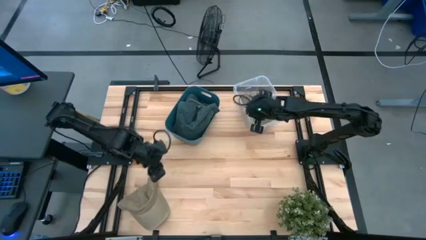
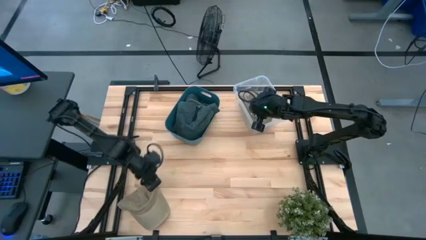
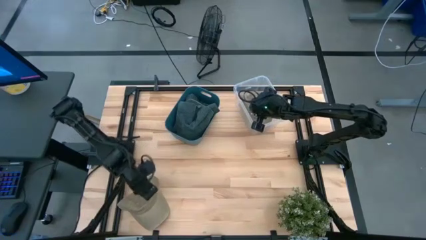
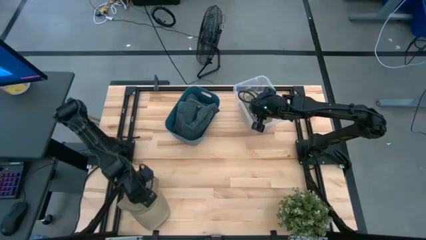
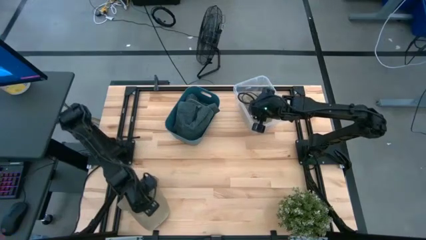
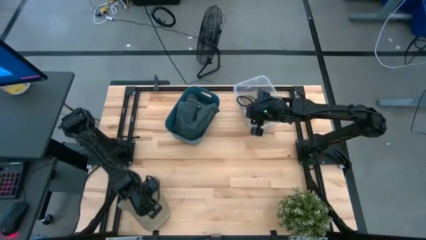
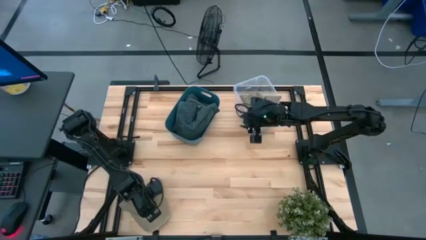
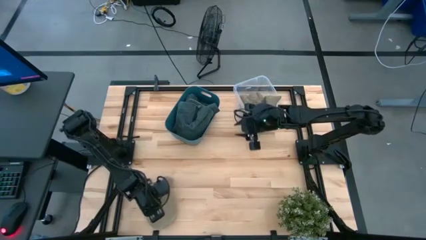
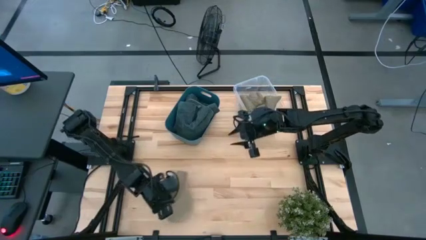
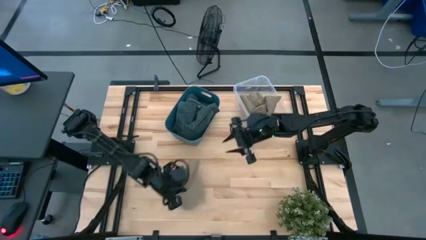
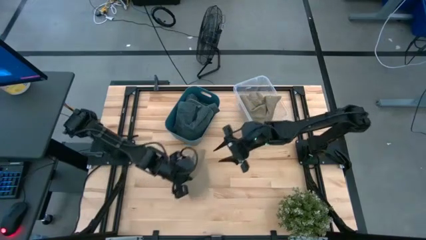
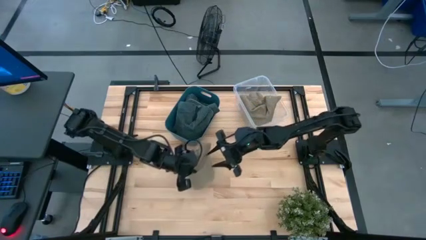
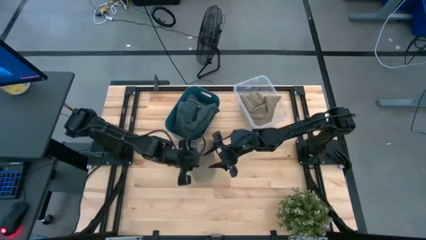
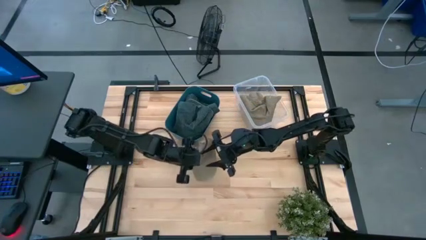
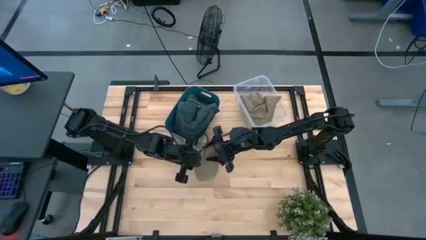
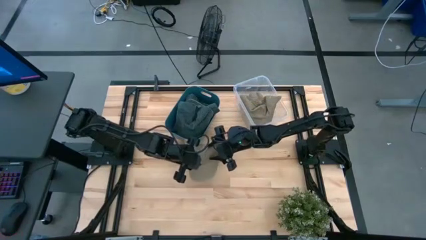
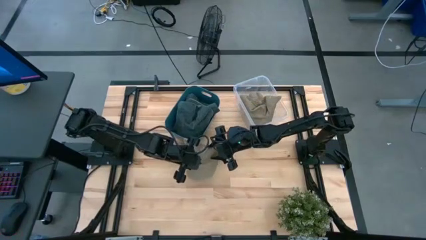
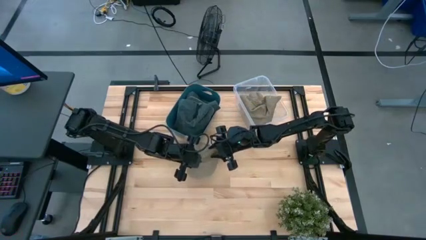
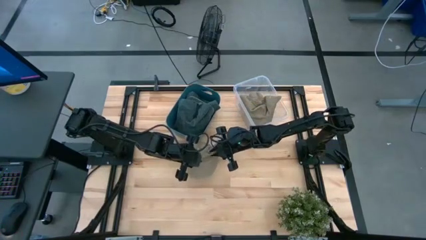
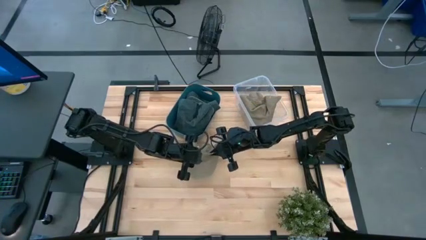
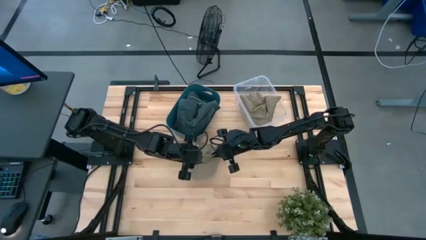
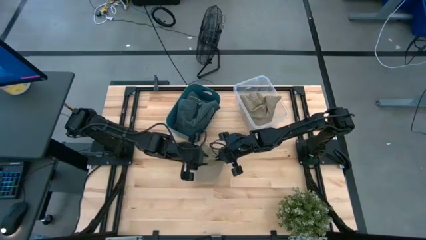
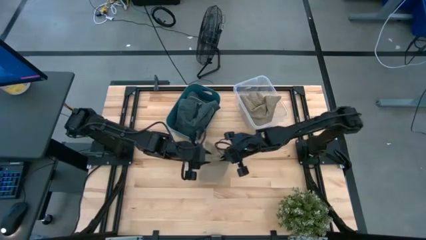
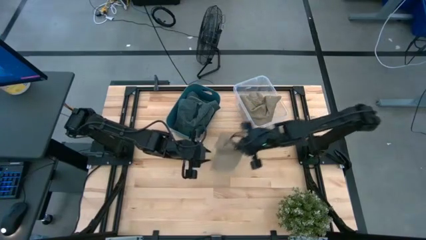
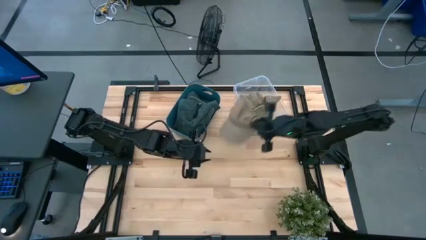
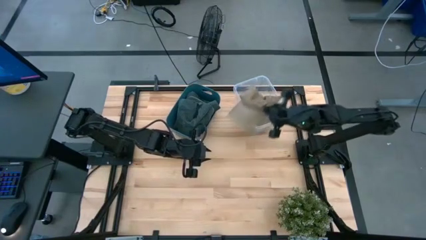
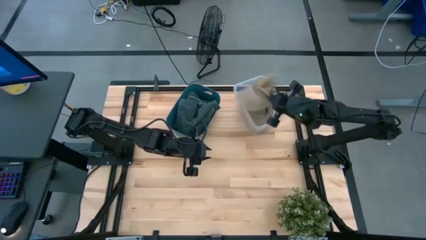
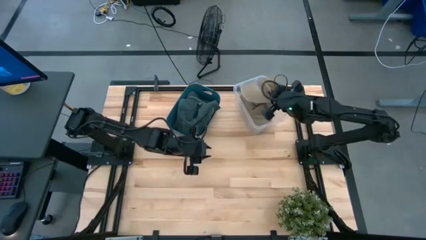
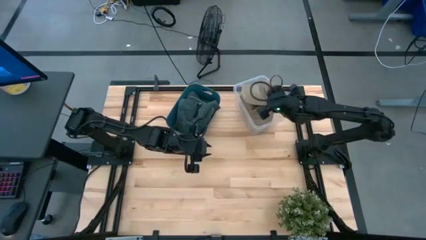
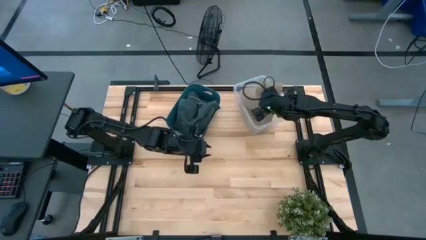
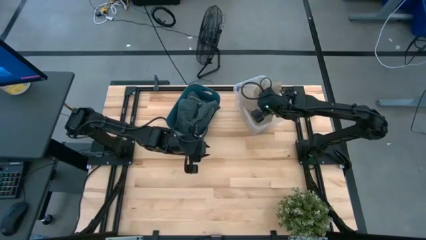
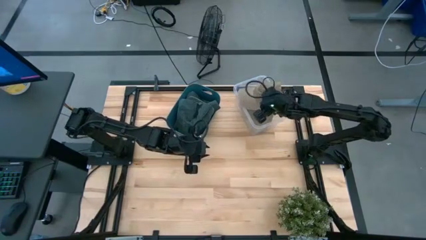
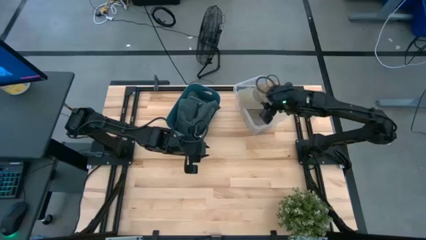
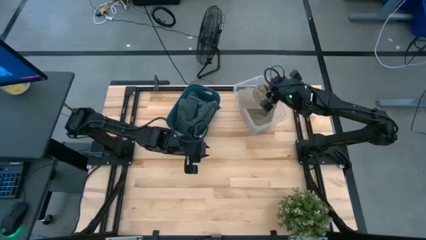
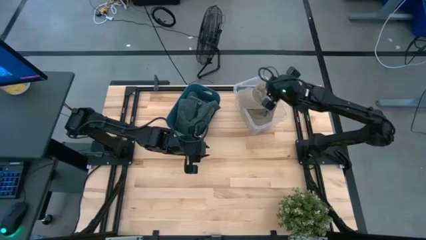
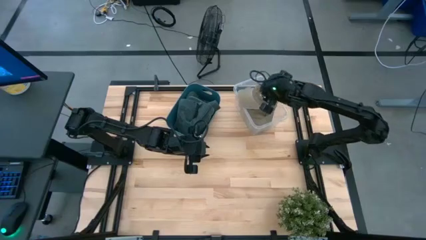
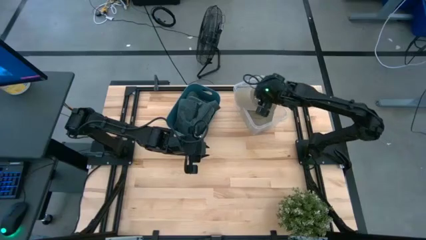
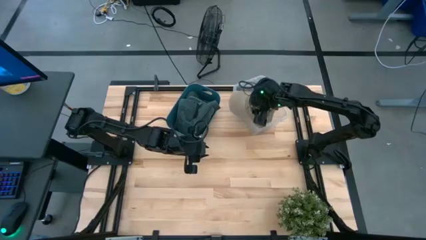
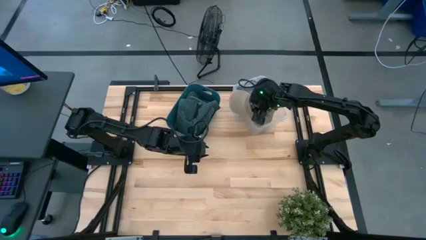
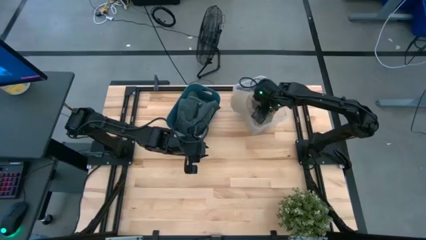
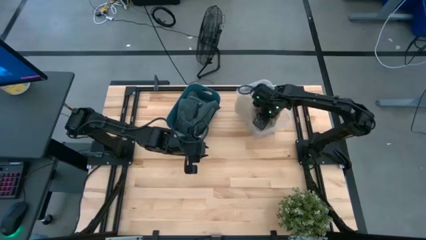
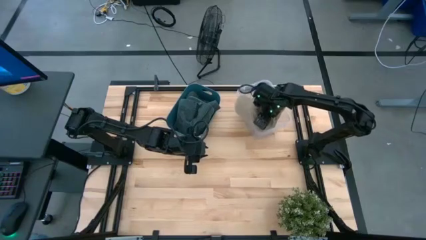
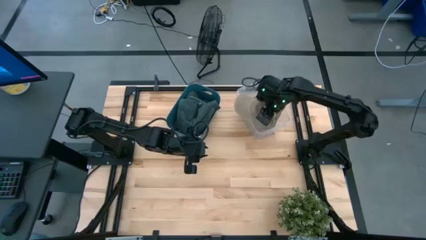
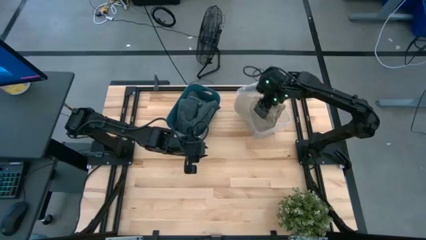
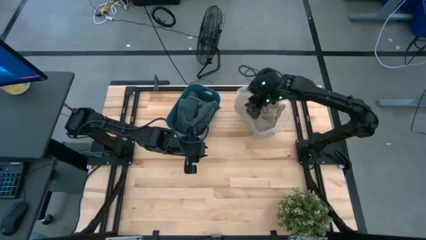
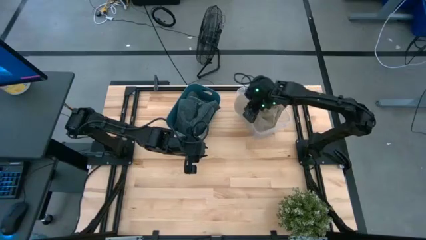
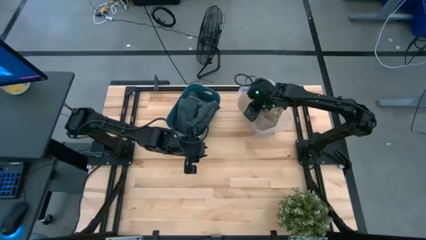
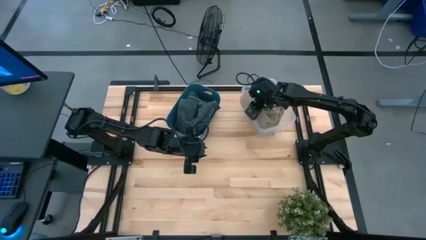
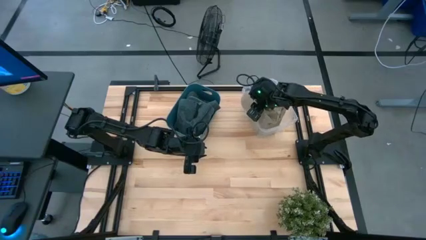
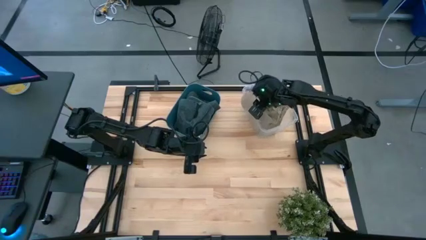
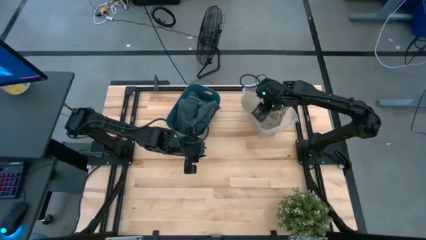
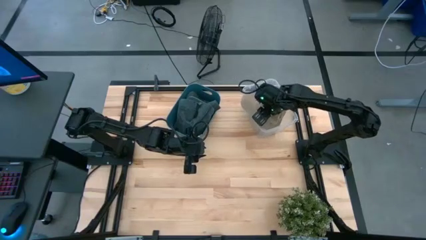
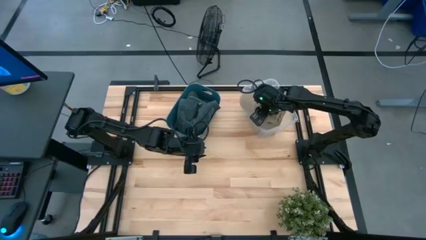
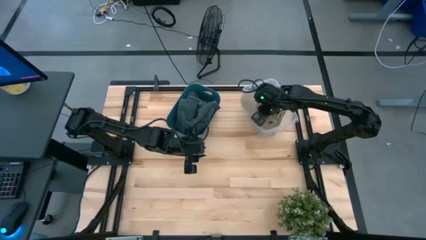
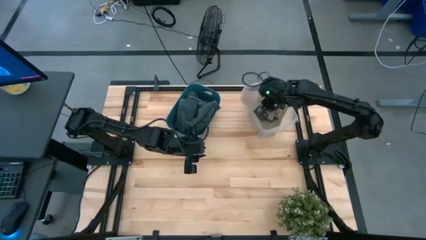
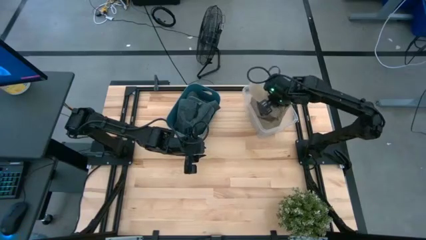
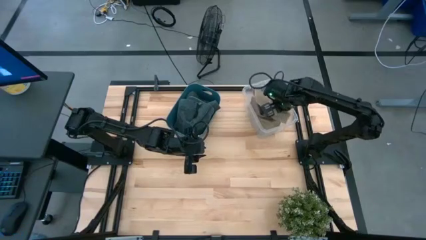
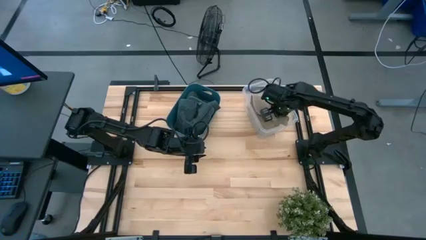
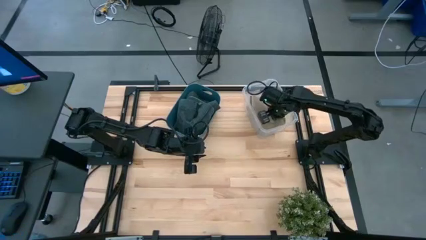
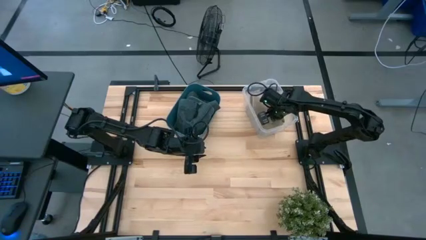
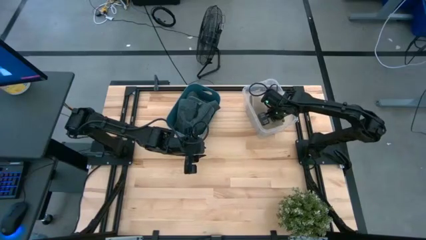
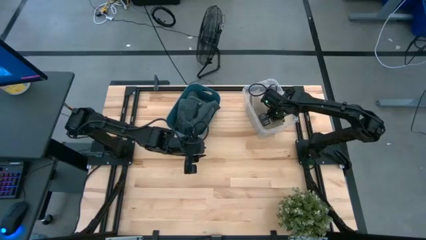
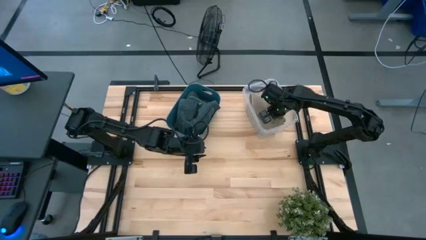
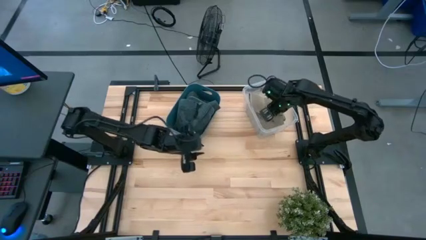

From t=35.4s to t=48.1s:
Task: Pick & Place hat
Put the brown cap into the transparent bin

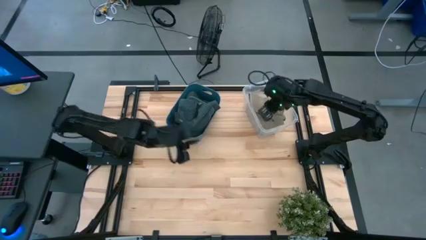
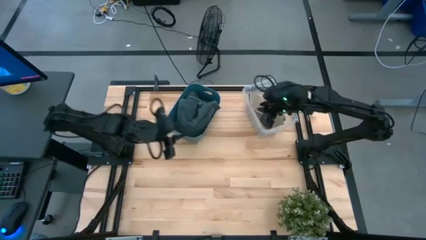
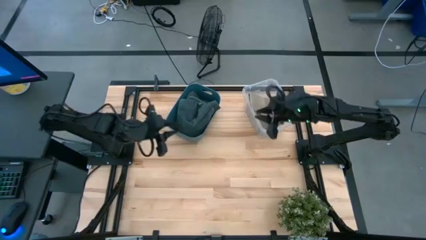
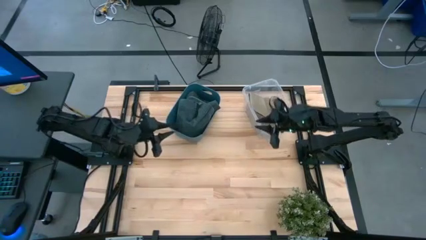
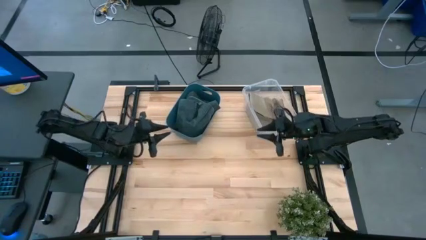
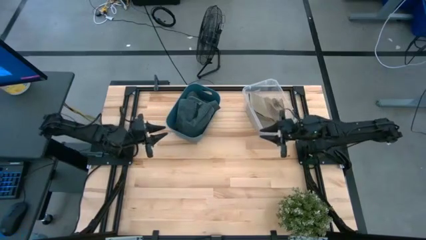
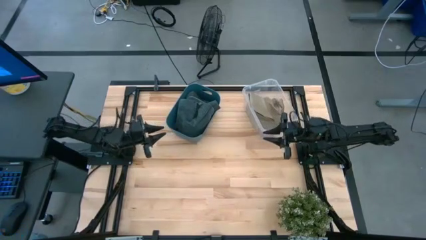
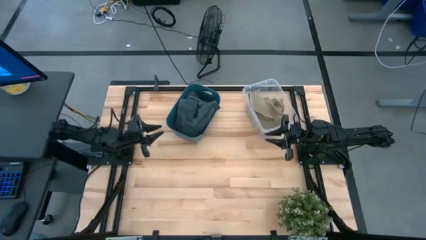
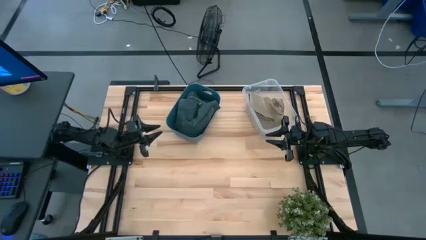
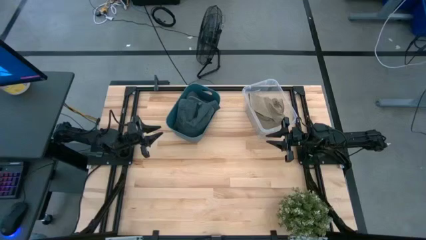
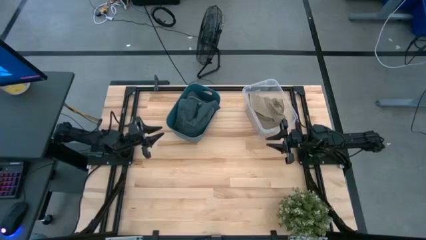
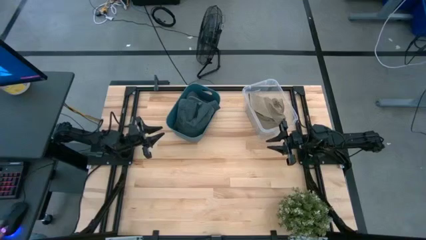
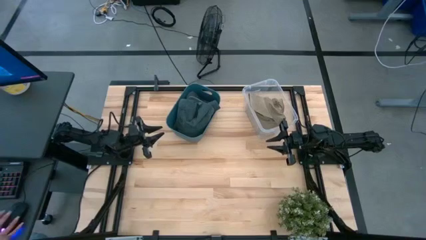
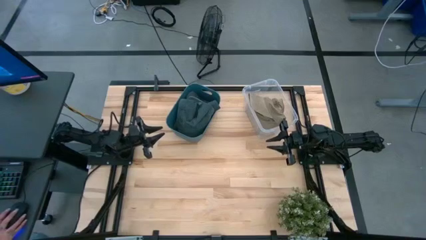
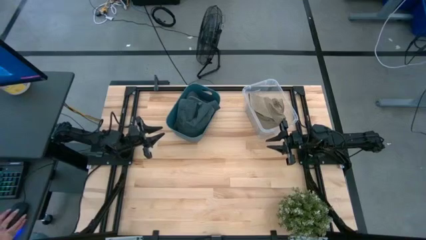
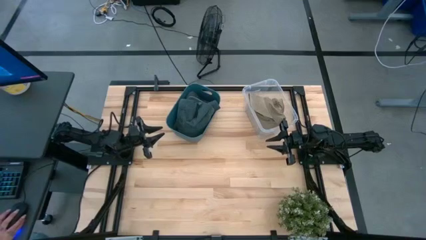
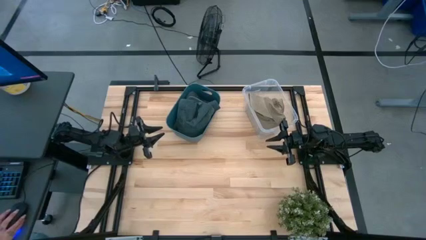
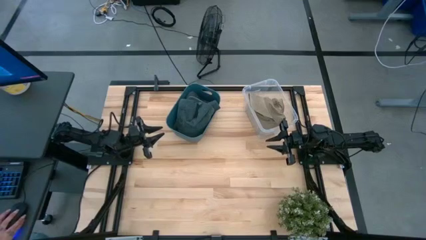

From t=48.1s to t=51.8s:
Return to Home Position
